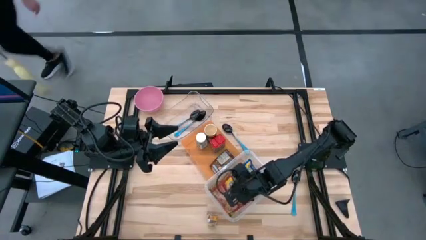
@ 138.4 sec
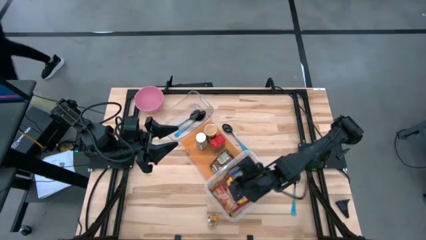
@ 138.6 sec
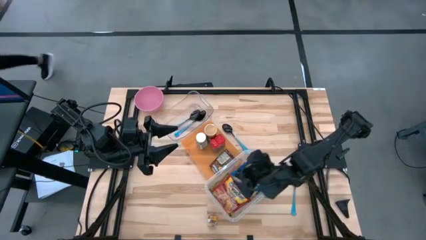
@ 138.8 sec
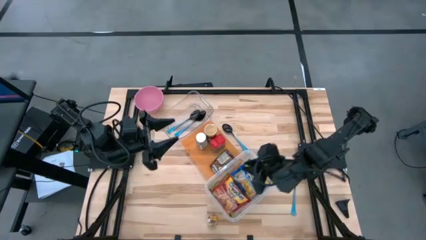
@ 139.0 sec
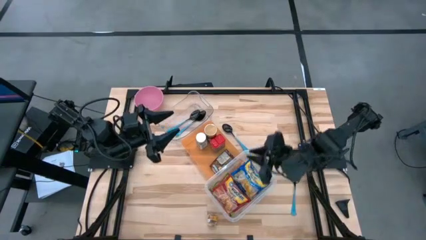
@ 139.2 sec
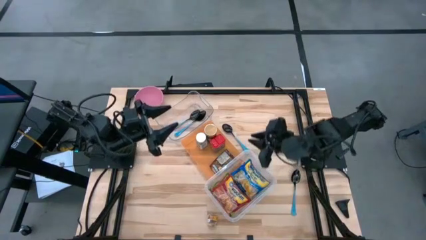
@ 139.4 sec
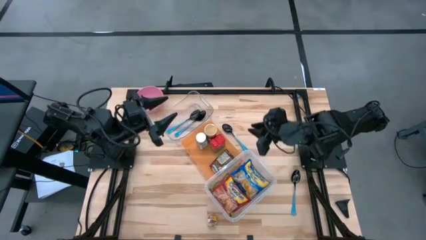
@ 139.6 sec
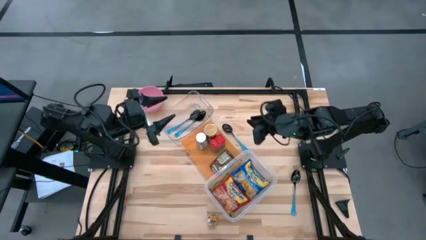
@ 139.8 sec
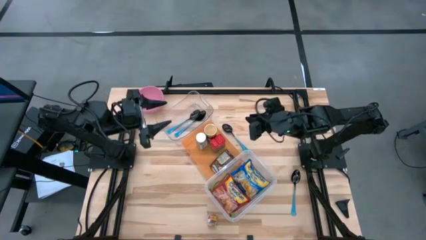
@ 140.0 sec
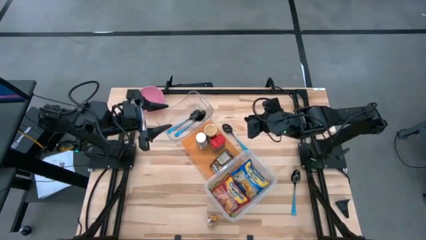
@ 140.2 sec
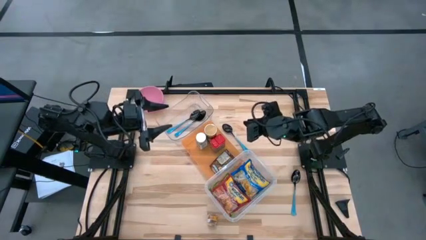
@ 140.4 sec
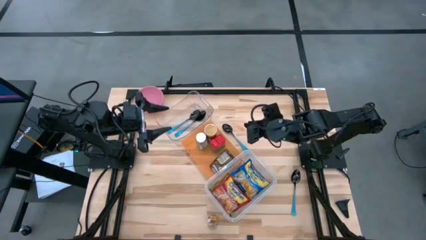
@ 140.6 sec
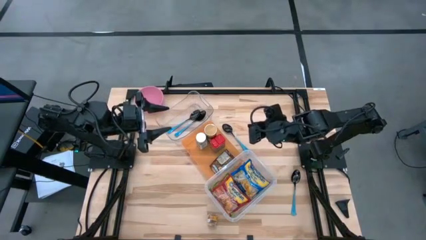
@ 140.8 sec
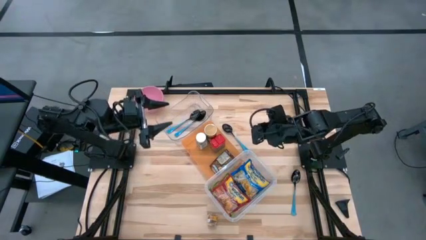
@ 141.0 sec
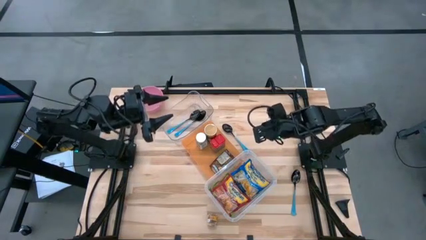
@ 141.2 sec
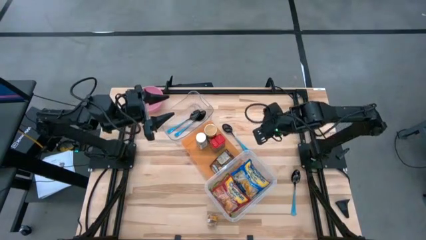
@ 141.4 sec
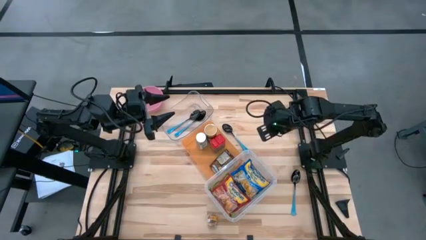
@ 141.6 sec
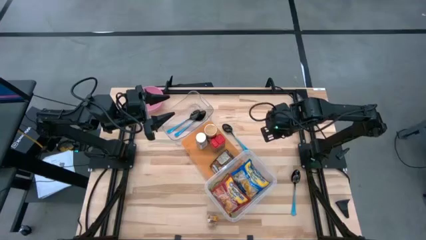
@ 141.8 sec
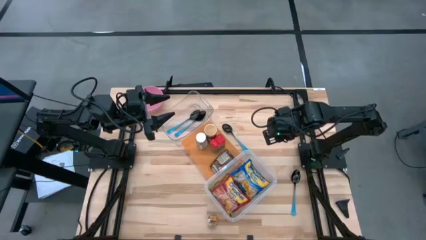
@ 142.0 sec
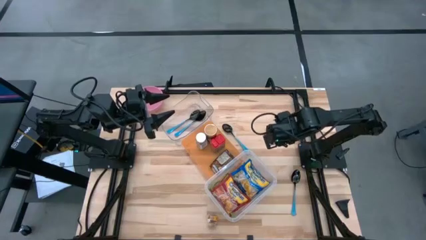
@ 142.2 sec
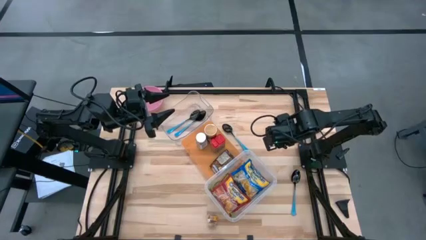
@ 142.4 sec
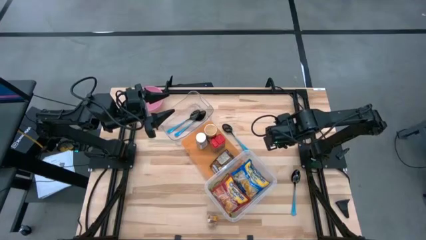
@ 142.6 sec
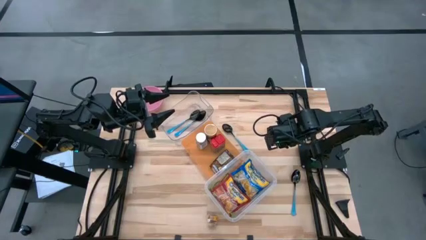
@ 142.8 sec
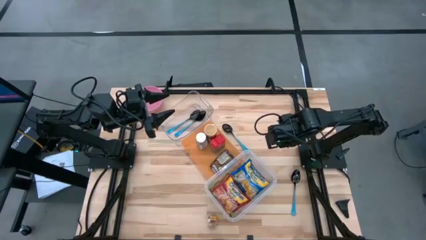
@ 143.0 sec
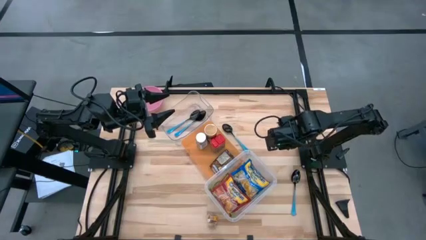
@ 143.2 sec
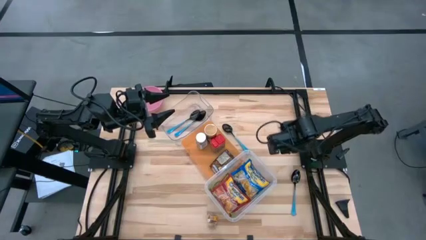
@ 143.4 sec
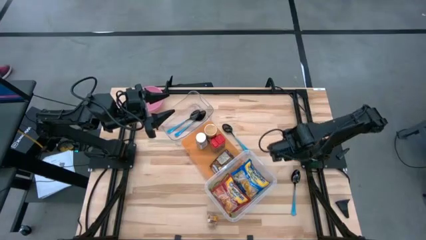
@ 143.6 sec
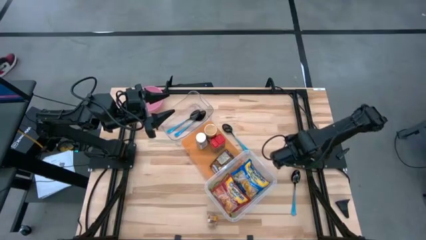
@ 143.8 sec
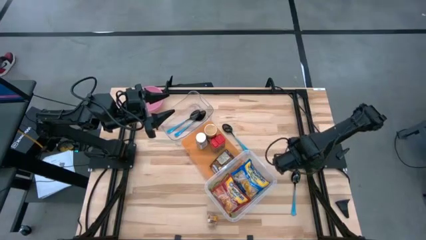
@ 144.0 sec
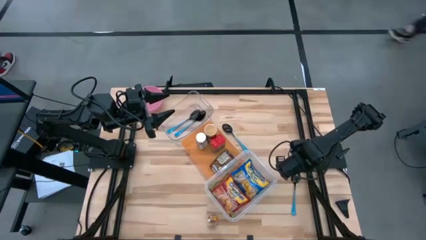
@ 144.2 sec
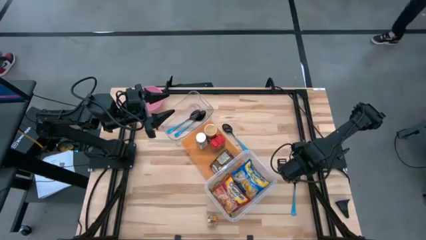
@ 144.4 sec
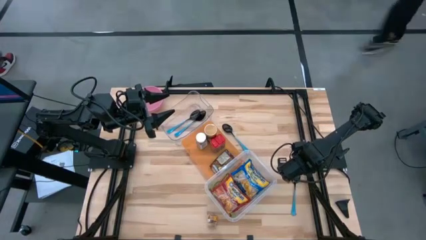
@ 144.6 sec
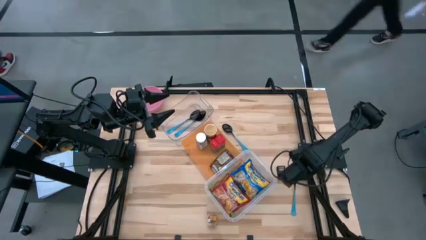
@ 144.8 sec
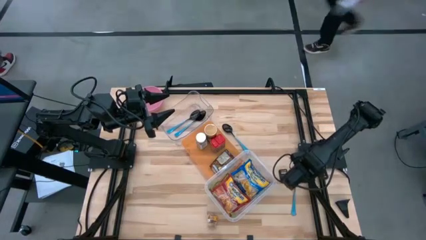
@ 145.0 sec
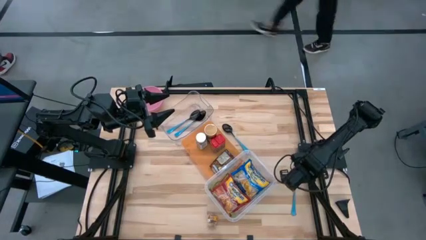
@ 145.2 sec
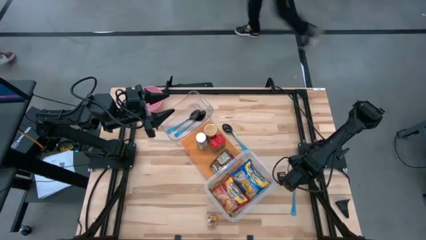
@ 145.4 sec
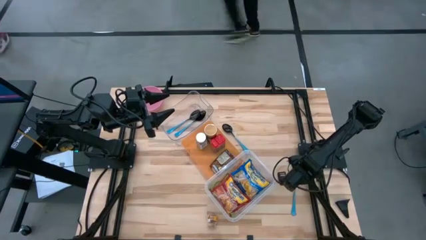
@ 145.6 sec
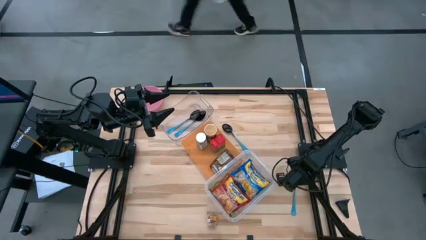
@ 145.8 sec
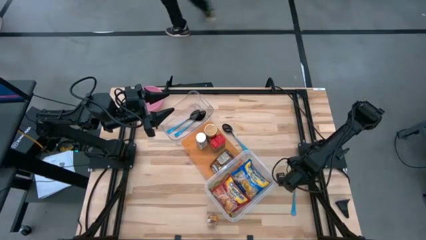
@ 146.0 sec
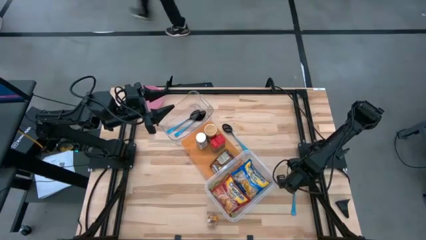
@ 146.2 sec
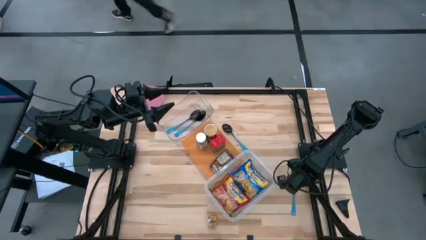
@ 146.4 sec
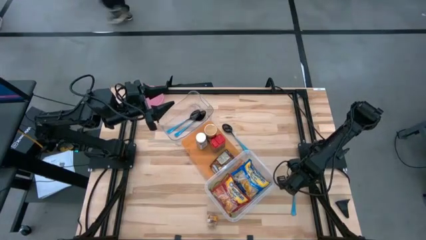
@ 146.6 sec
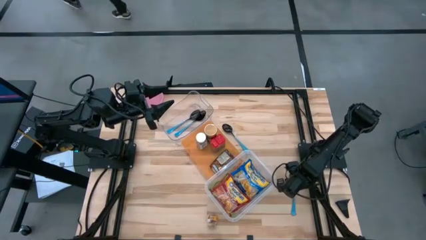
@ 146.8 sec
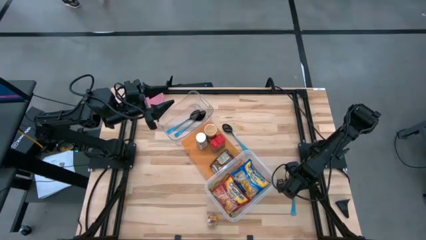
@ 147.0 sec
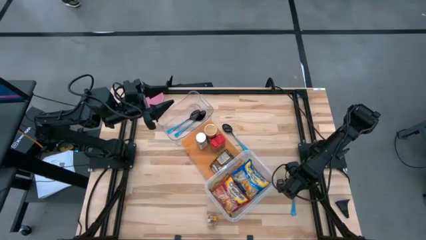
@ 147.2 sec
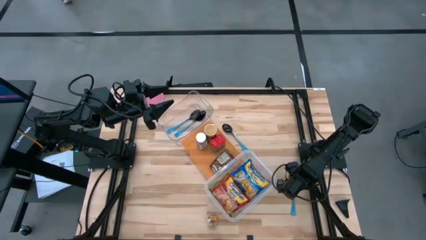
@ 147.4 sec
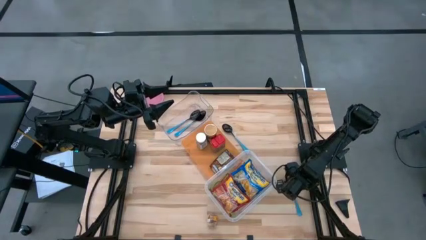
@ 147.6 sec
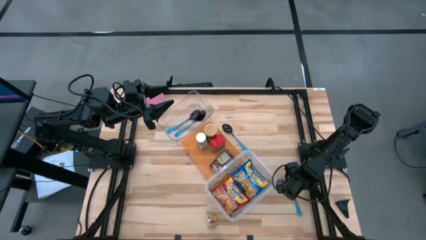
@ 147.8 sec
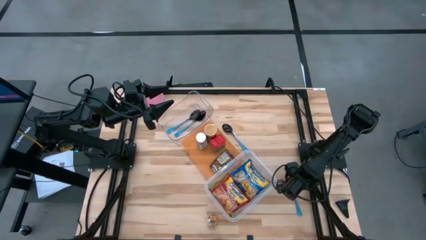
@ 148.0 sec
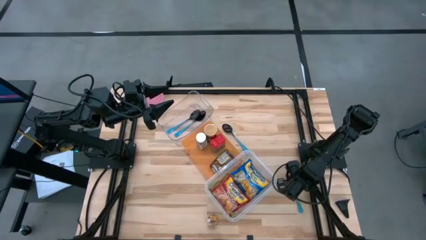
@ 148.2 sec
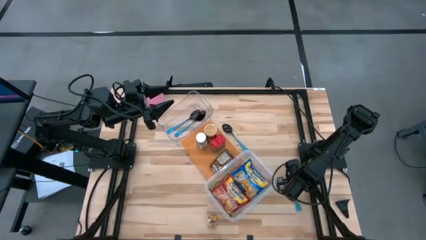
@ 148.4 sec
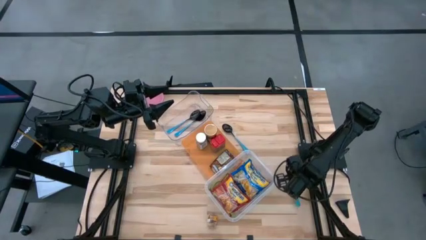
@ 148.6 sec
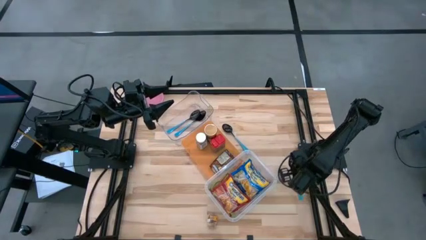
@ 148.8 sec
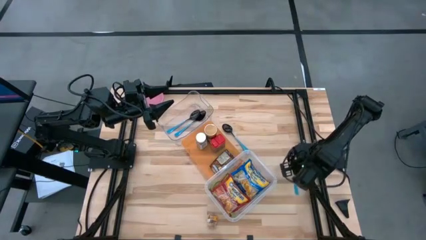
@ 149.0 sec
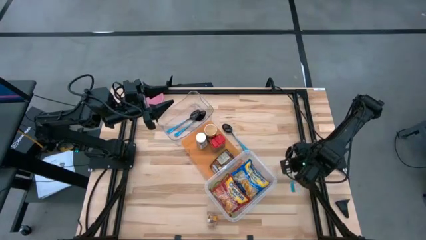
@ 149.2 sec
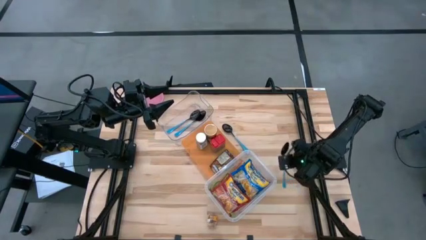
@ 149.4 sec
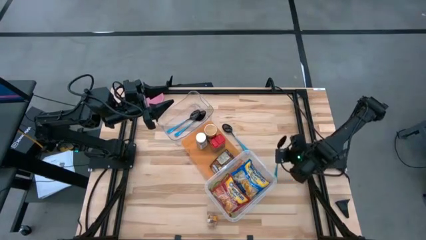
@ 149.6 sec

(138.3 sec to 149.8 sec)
Task: Pick & Place Food Item
Put the blue spoon into the top transparent bin
